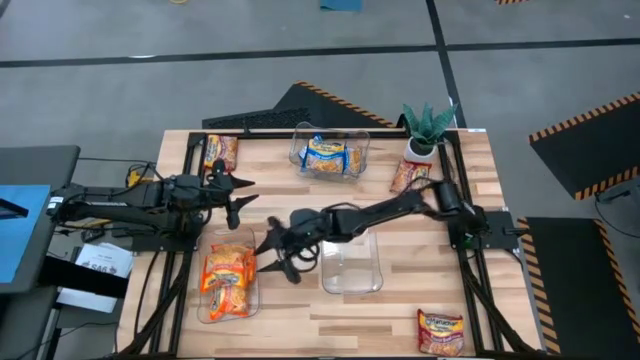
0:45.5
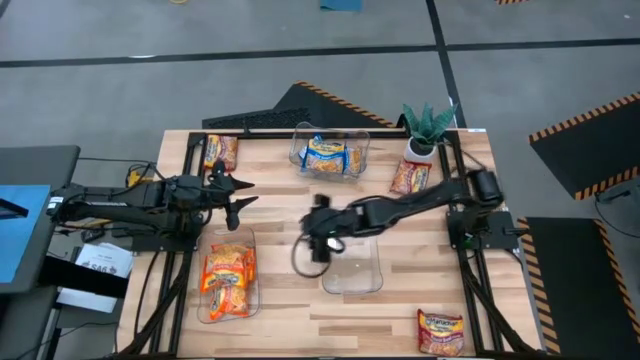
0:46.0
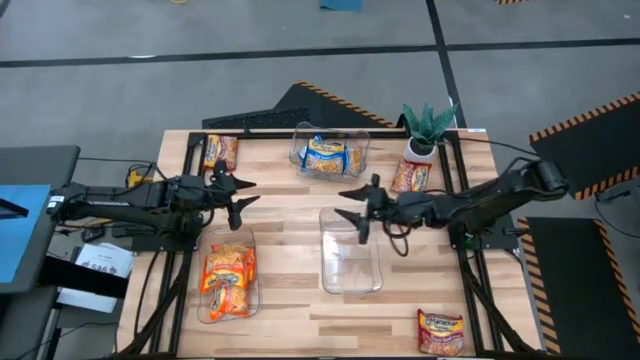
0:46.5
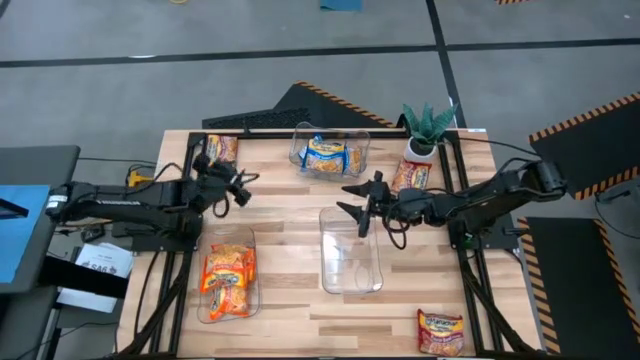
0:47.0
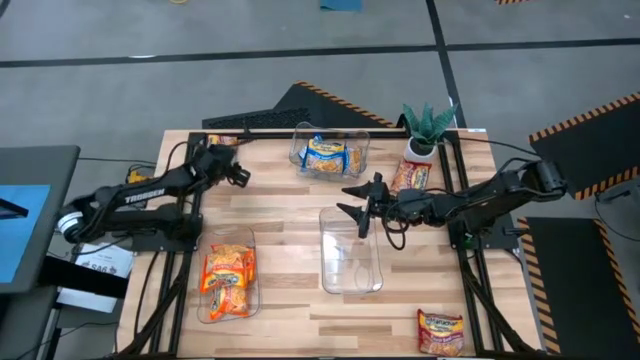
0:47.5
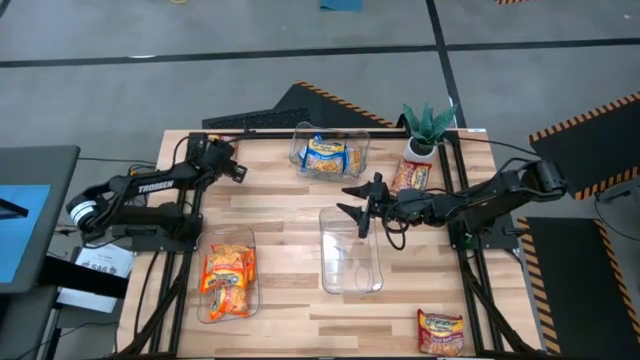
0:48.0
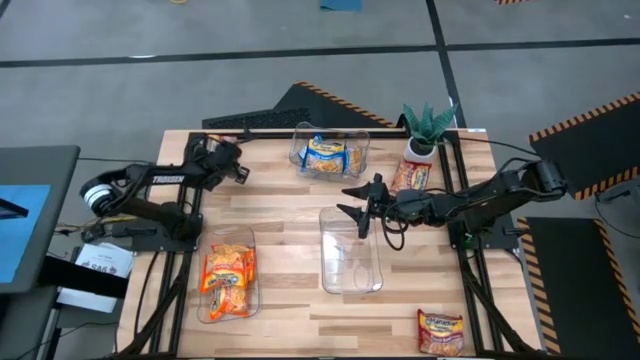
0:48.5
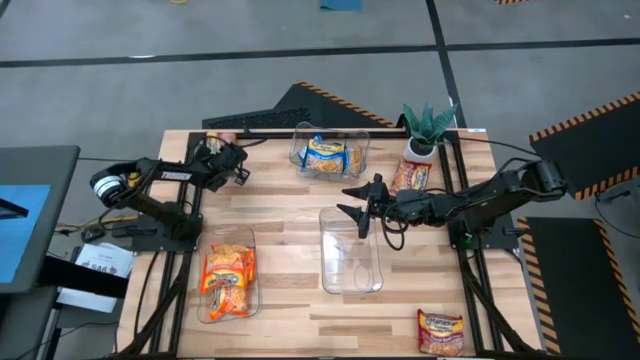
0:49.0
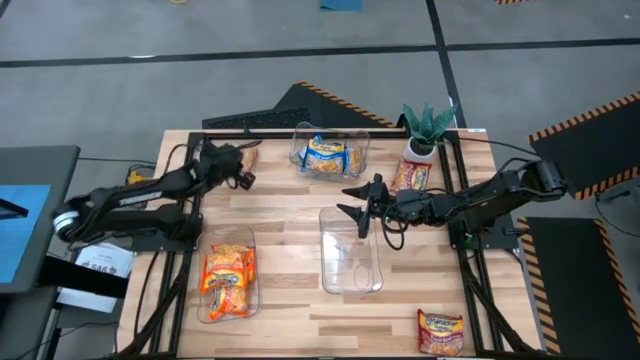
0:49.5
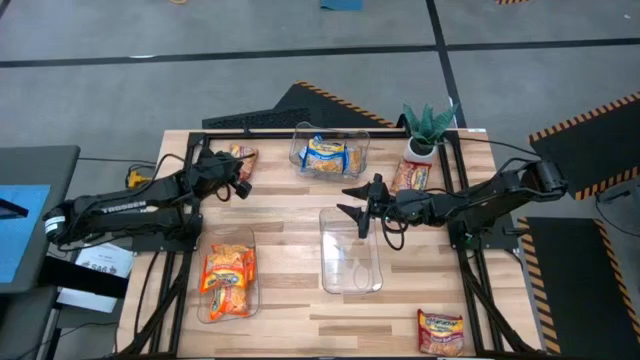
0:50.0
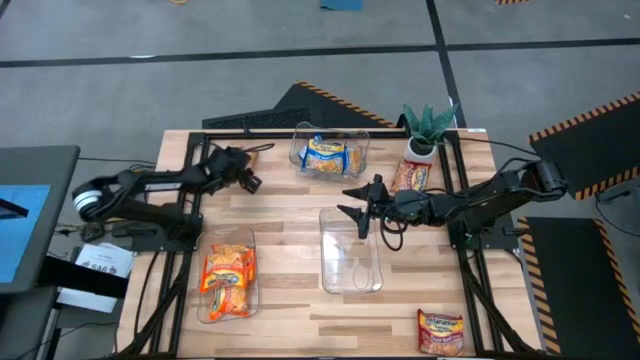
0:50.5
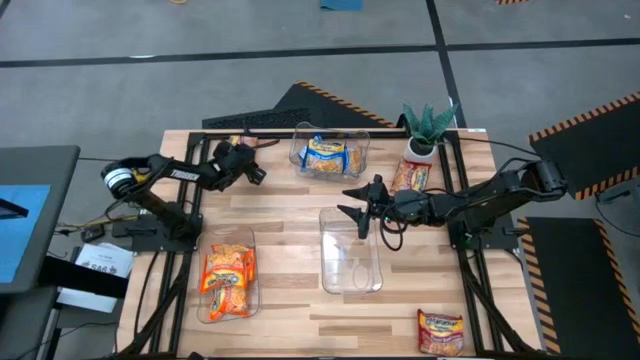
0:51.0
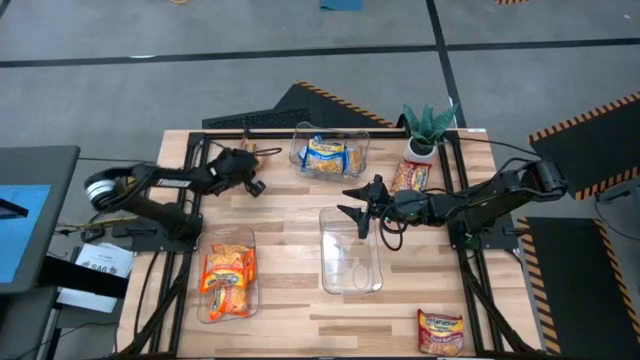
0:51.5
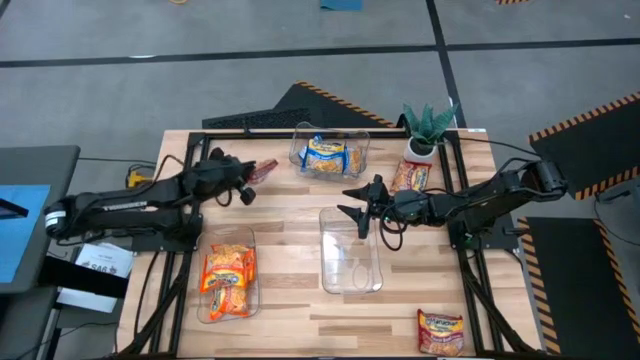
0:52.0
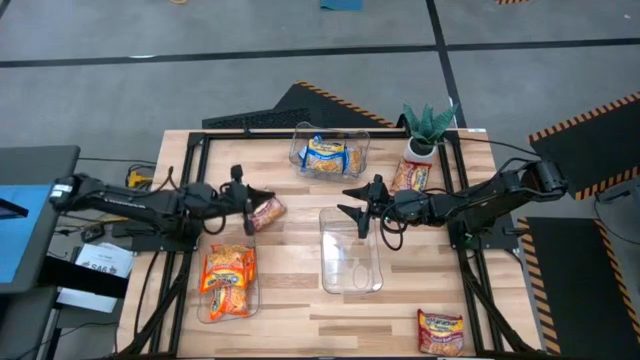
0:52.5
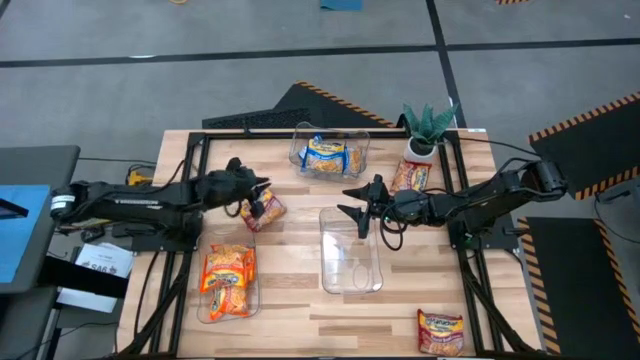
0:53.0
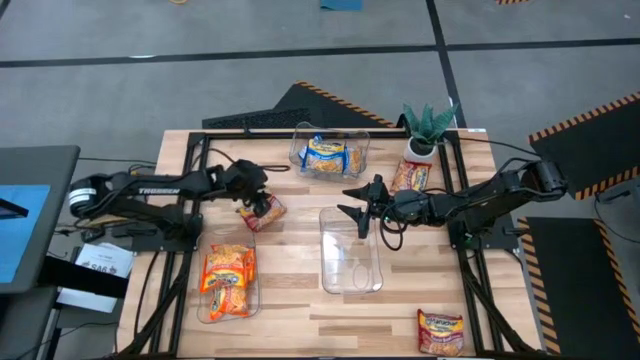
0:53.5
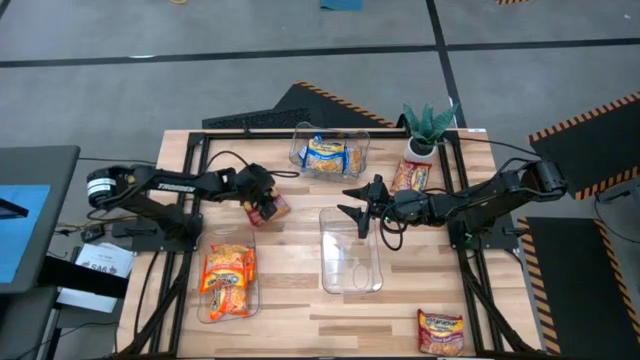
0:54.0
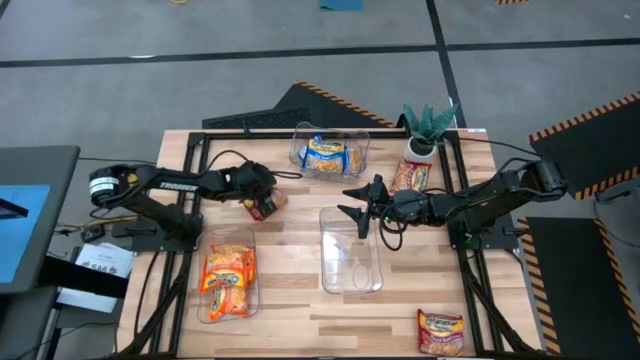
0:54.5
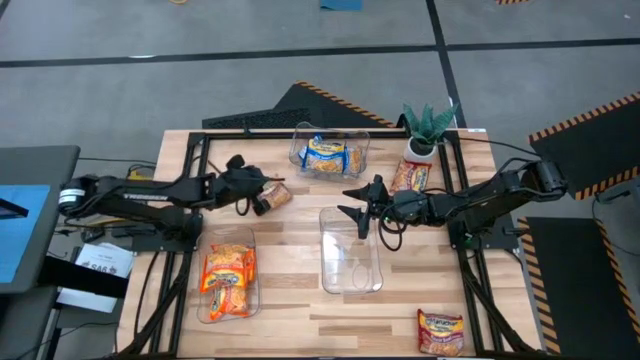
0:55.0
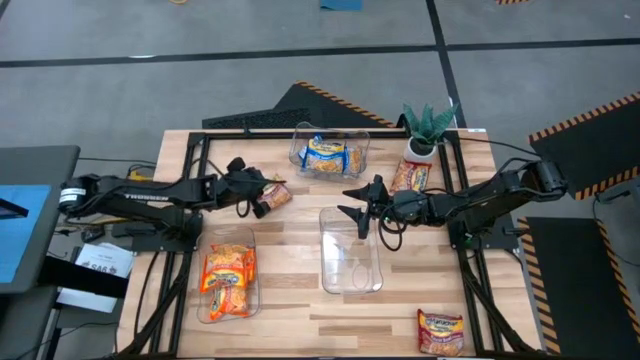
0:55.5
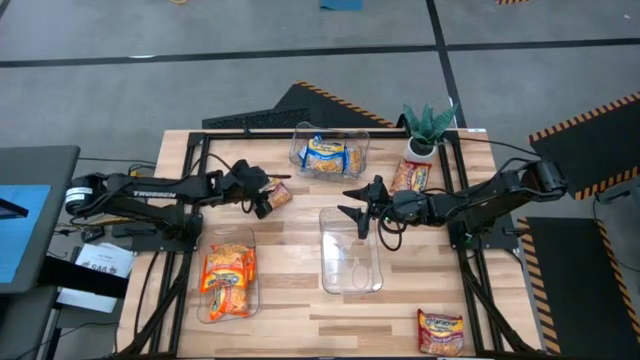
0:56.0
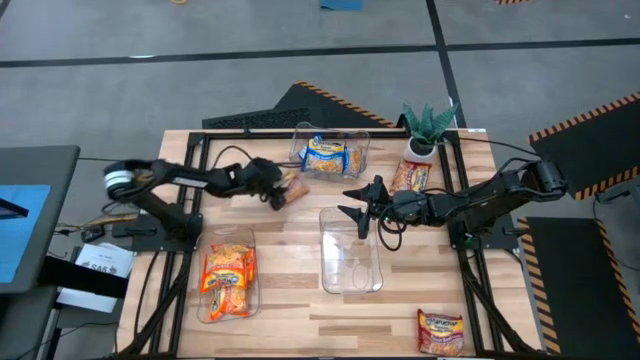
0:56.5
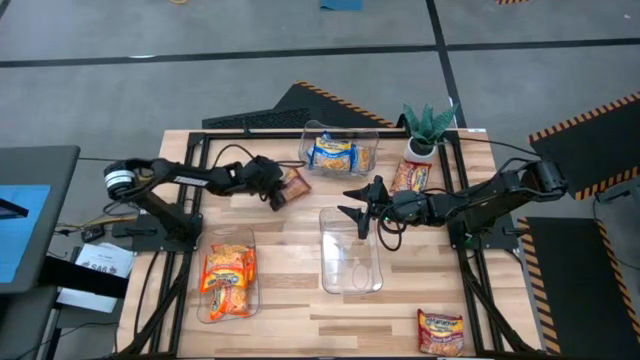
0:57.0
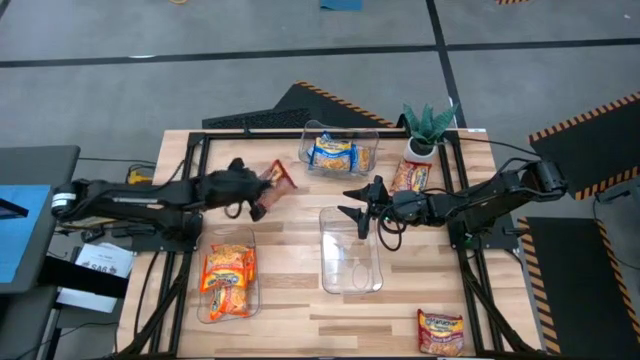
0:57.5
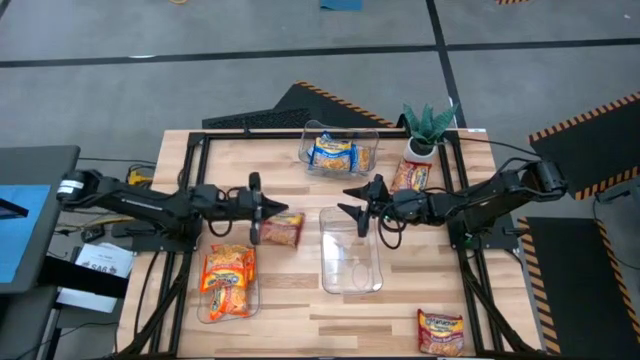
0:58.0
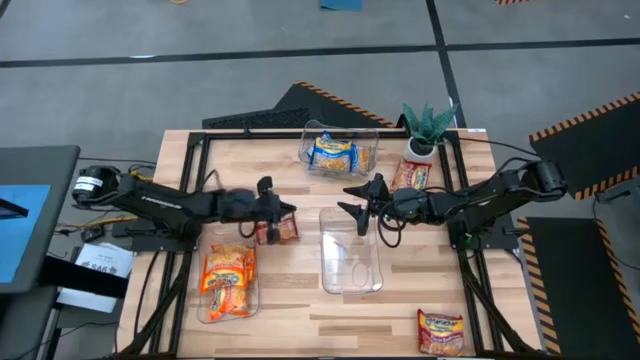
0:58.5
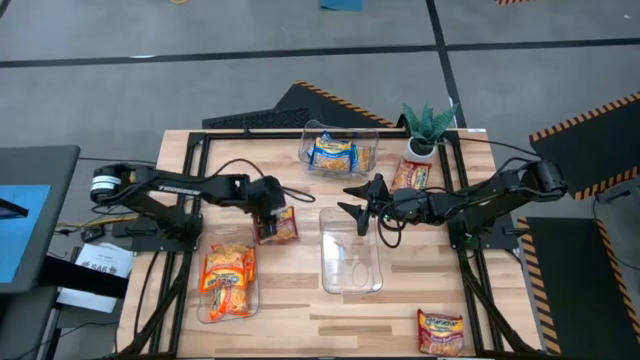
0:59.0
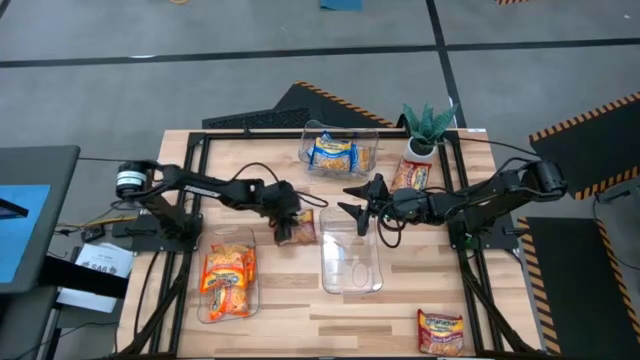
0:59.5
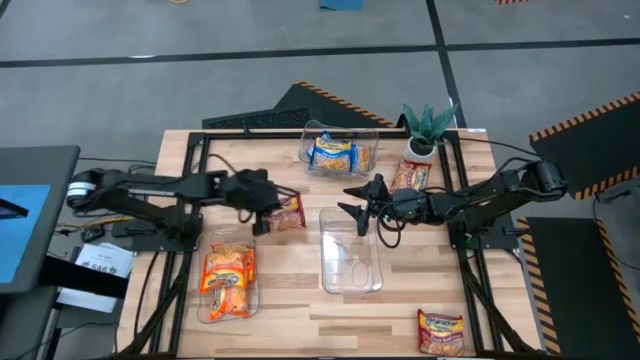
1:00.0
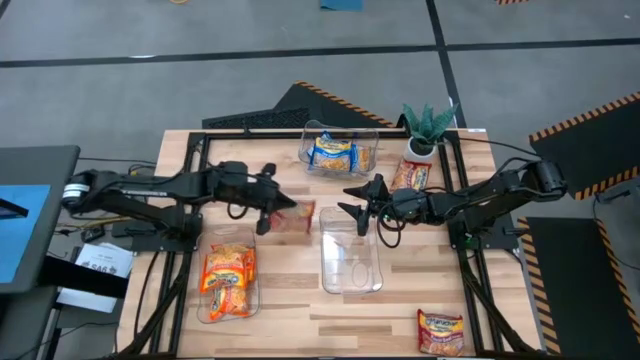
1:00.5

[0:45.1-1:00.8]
Task: Sort Maruchan noodles
Put the top left red noodle pack into the bottom right transparent bin

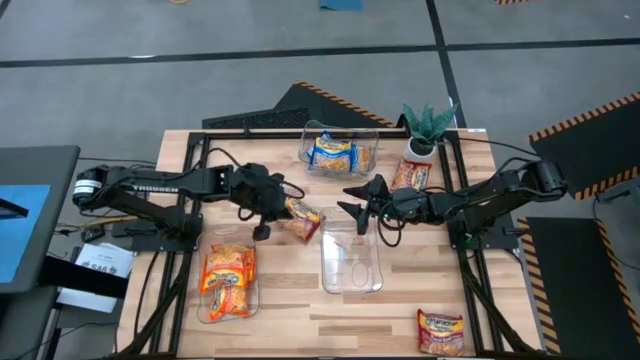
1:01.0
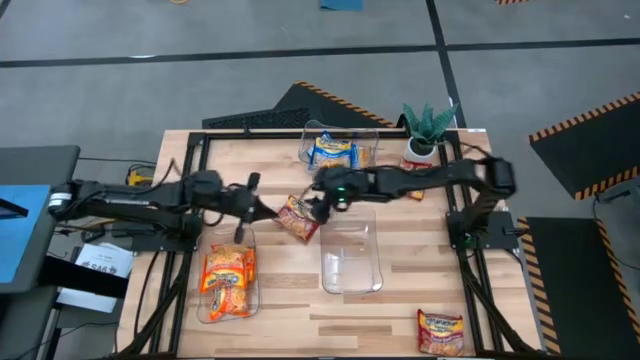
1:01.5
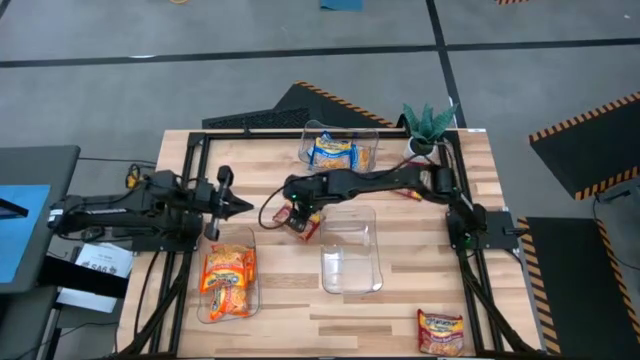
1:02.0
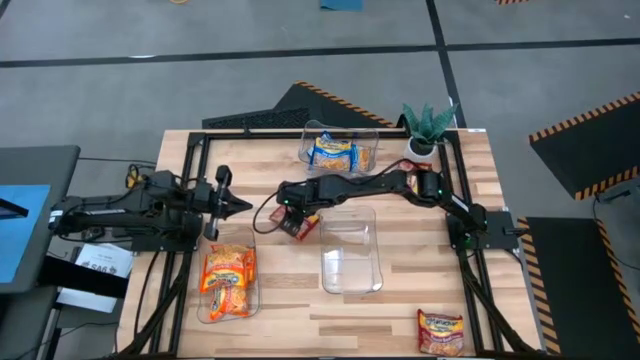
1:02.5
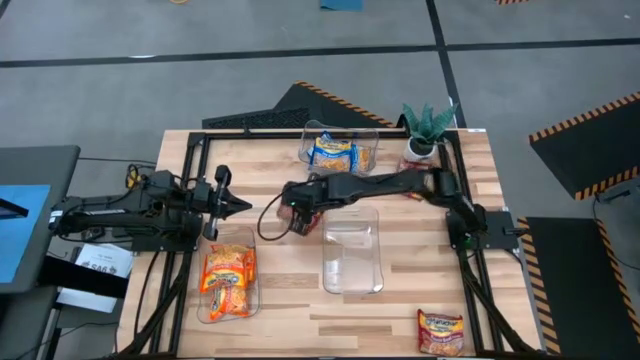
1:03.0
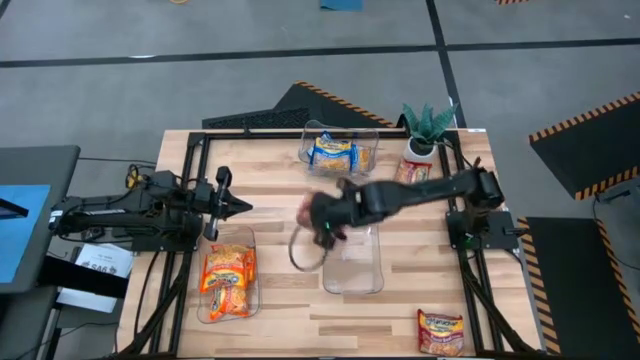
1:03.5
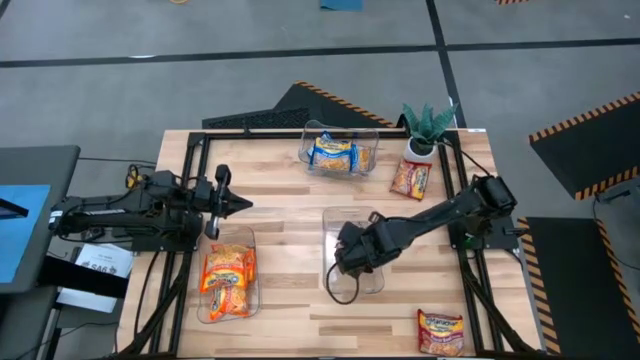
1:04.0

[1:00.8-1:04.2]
Put the top left red noodle pack into the bottom right transparent bin

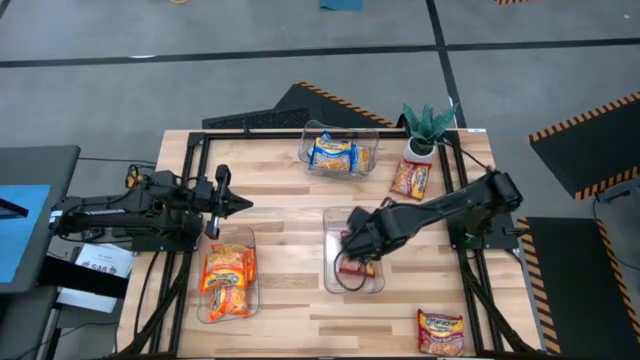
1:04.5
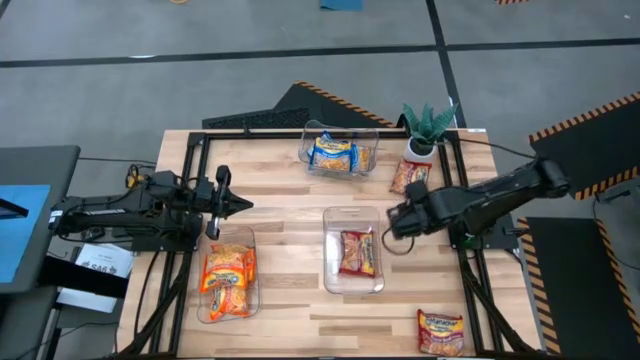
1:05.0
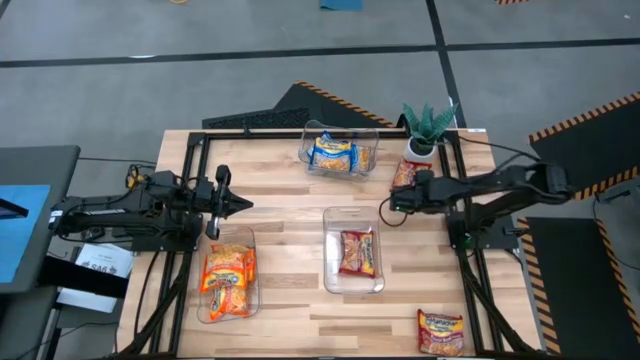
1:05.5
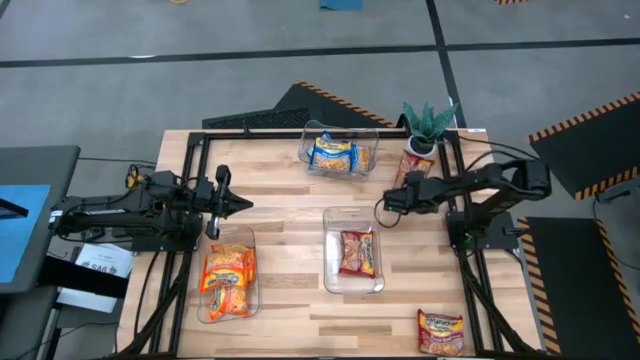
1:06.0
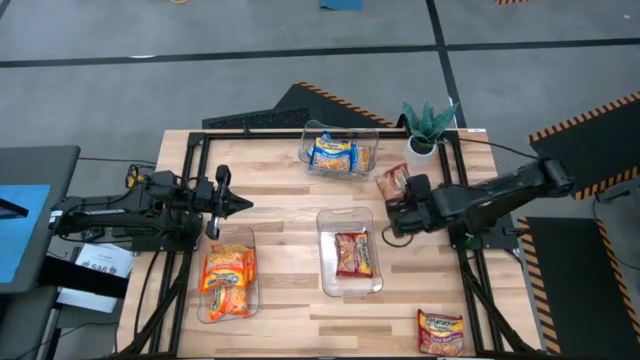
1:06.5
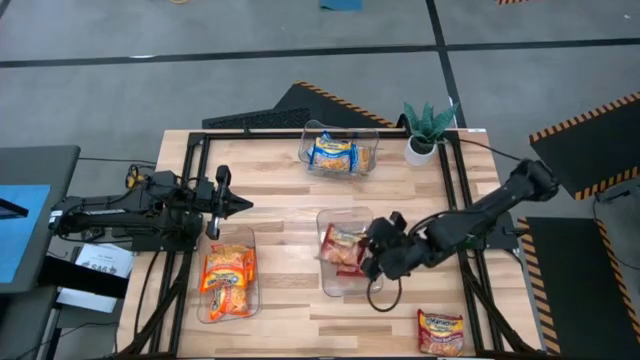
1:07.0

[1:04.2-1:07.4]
Put the top red noodle pack into the bottom right transparent bin
